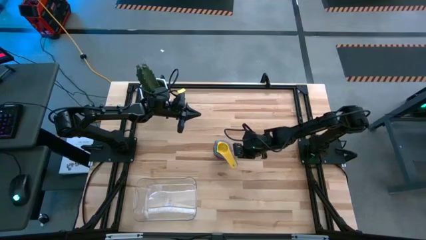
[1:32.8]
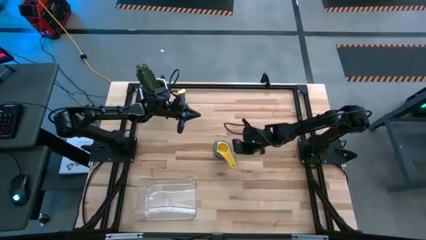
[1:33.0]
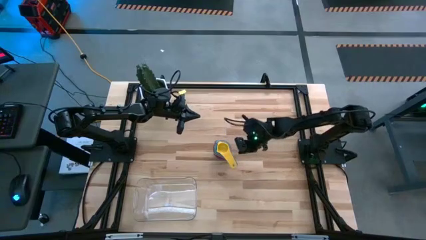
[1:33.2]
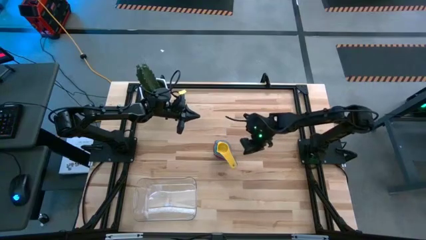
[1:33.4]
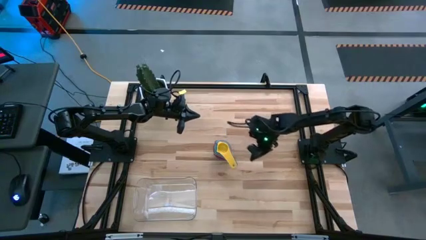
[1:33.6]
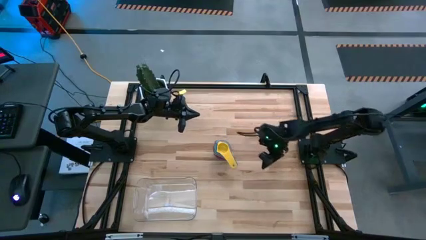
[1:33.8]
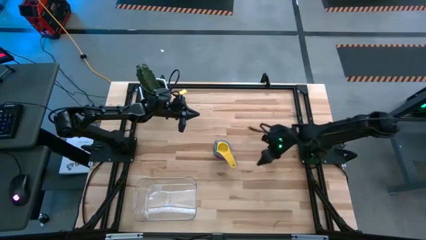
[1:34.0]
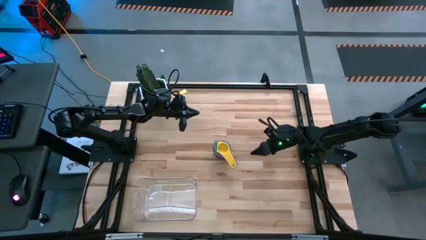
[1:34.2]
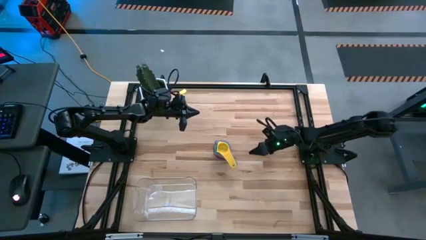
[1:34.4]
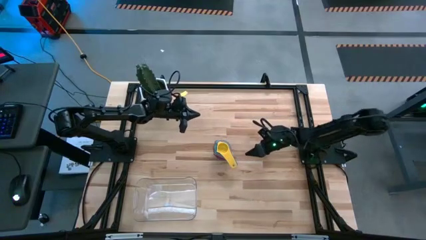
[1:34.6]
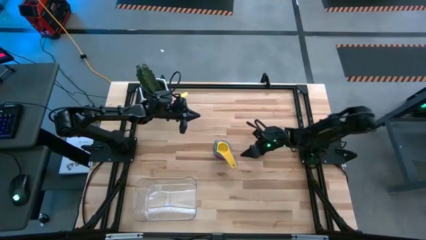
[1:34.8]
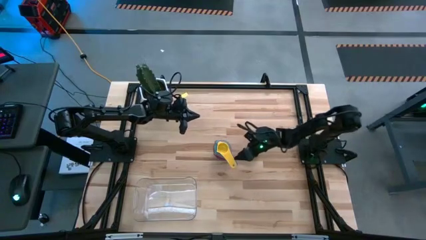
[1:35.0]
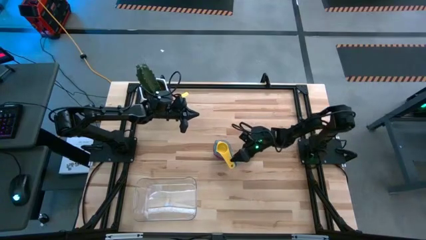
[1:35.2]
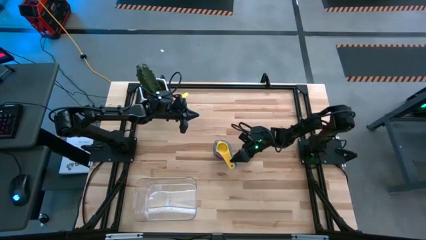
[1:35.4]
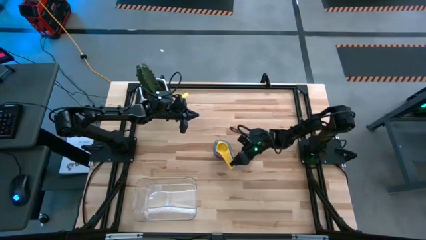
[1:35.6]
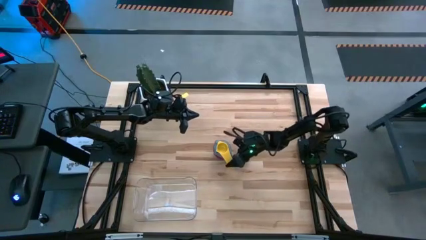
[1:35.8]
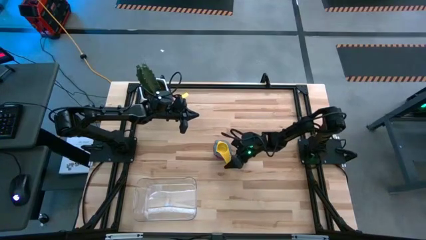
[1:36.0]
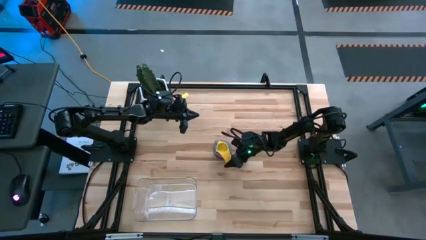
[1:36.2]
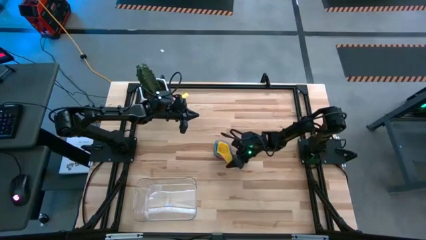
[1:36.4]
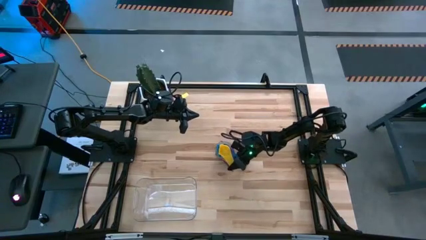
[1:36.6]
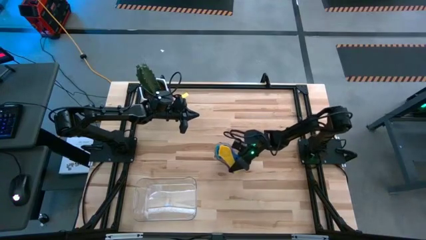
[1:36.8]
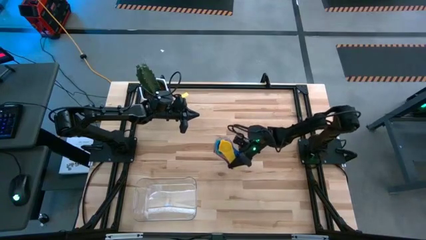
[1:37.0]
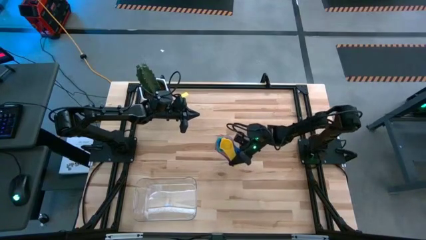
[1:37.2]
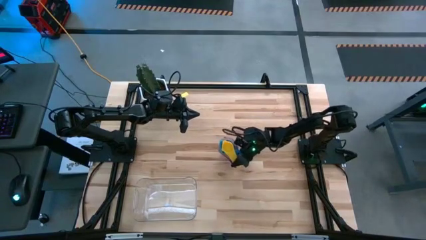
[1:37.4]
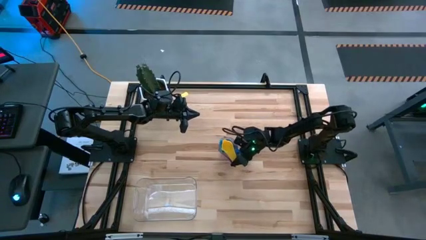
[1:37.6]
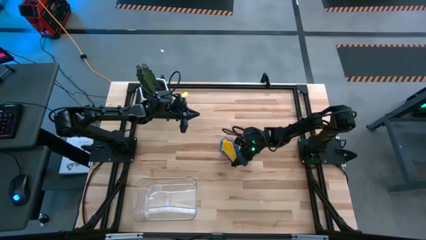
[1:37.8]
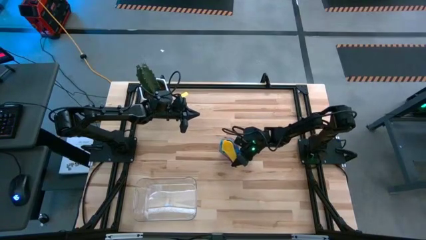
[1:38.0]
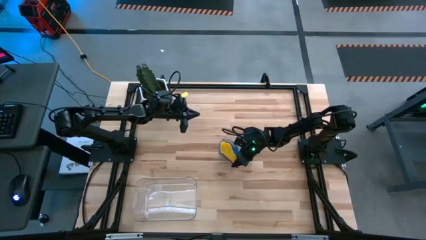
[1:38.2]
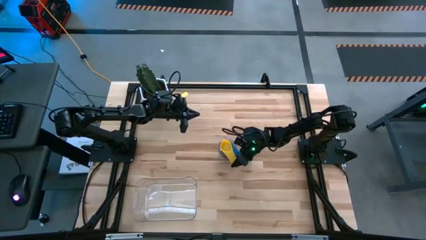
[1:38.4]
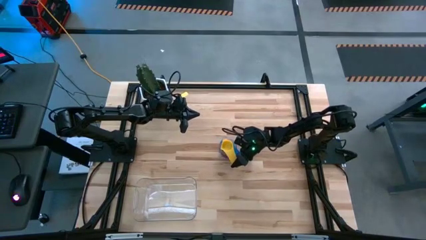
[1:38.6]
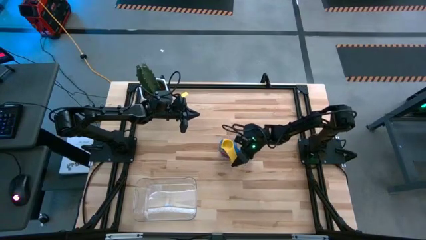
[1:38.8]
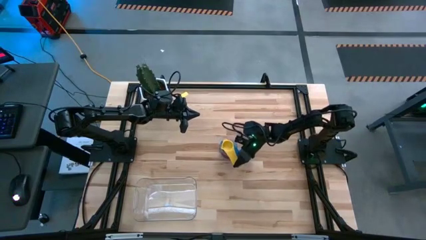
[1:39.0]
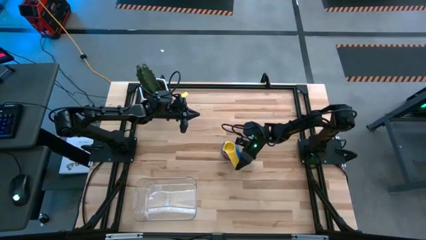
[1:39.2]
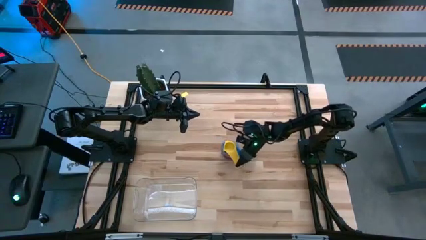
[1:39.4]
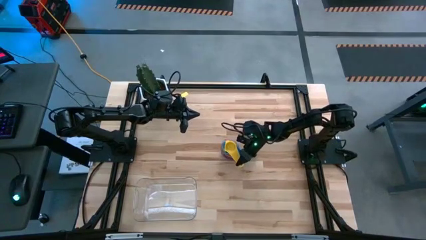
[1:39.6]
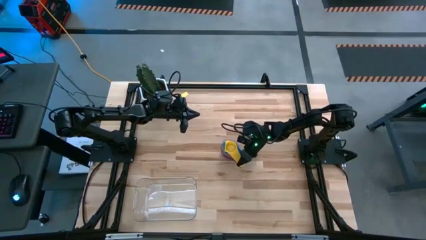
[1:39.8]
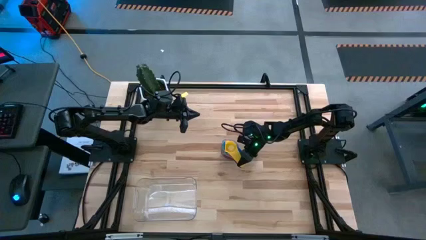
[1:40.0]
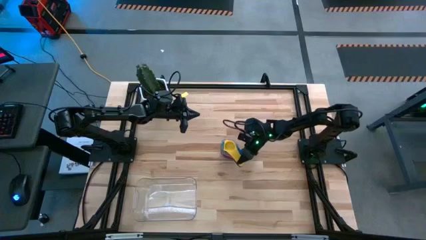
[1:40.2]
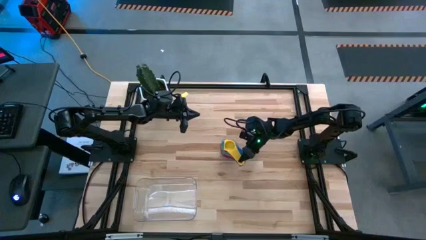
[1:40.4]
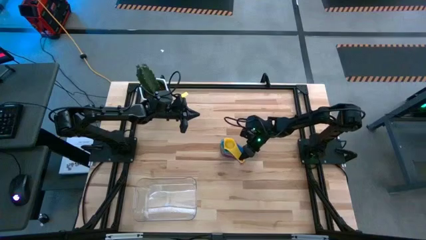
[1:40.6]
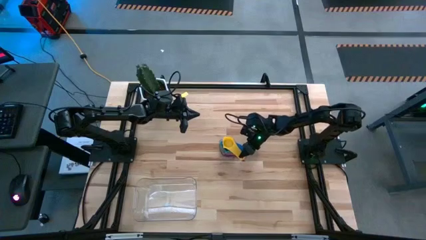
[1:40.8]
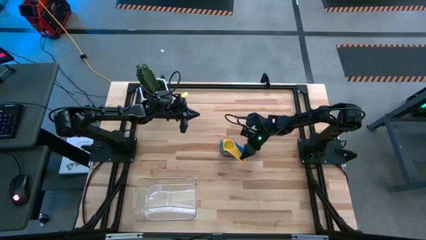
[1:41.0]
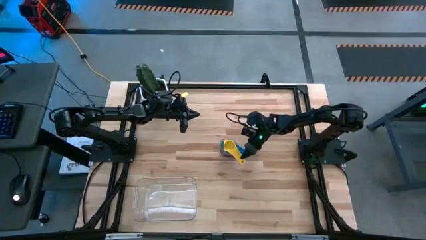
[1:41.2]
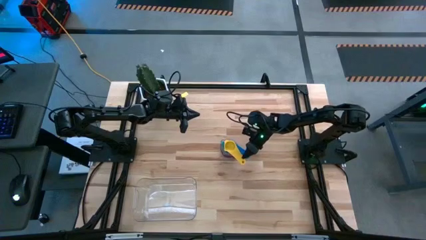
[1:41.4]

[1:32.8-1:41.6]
Task: Nest measuring cups in basket
Put the nested measuring cups into the transparent bin

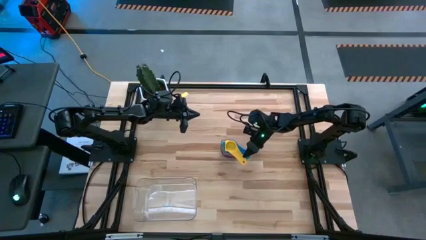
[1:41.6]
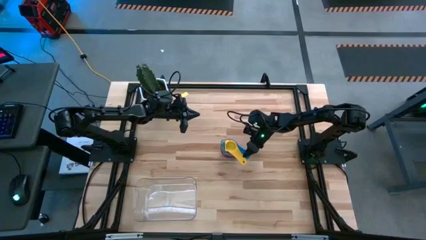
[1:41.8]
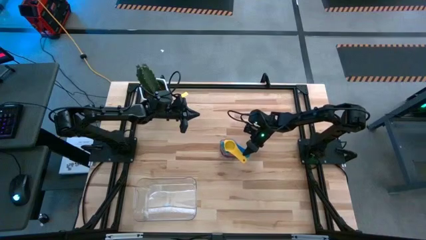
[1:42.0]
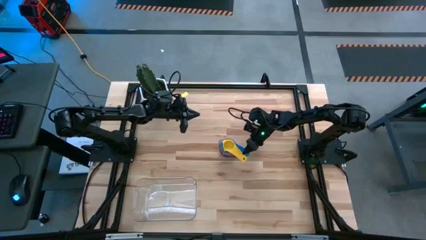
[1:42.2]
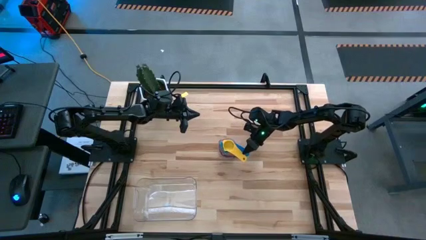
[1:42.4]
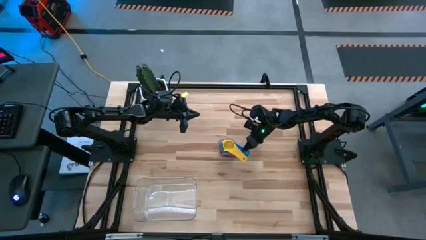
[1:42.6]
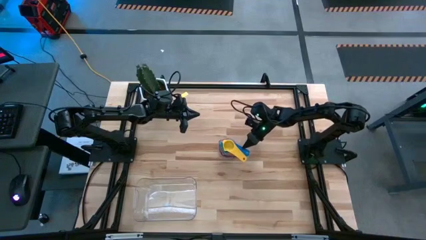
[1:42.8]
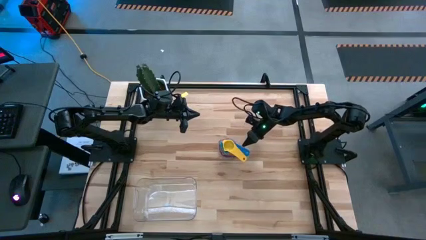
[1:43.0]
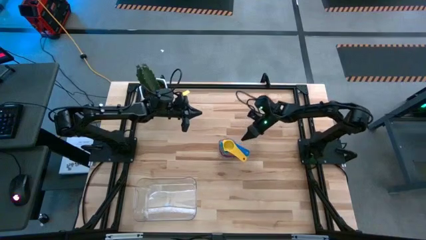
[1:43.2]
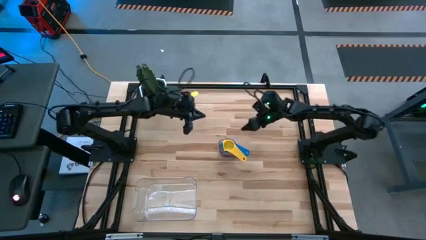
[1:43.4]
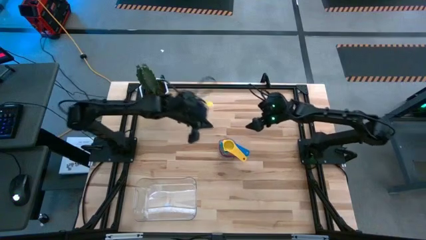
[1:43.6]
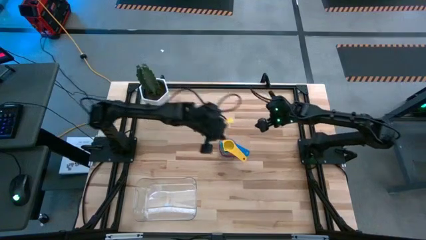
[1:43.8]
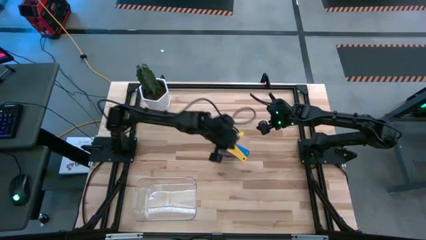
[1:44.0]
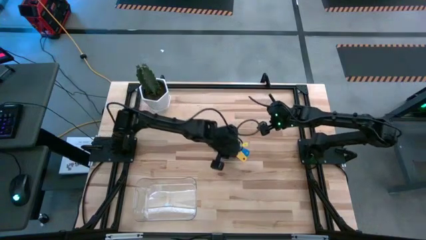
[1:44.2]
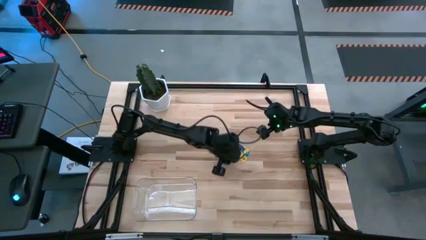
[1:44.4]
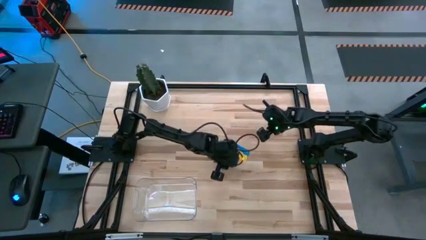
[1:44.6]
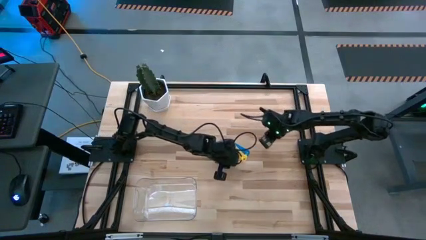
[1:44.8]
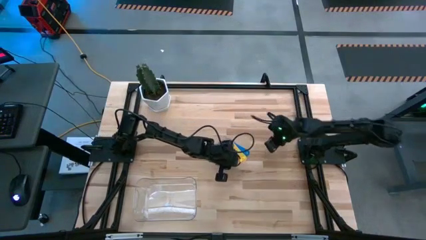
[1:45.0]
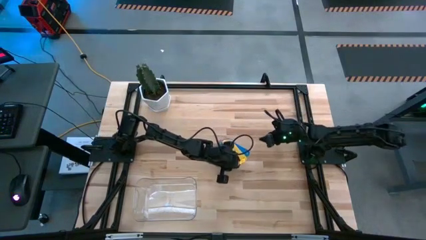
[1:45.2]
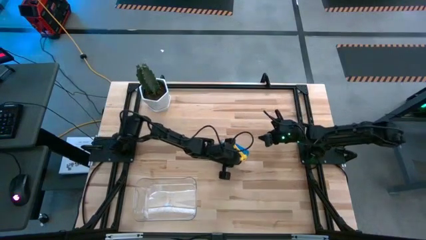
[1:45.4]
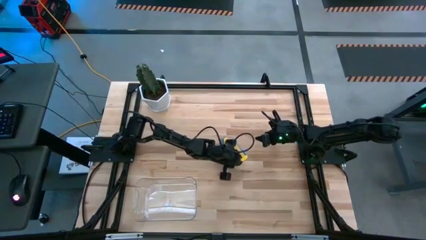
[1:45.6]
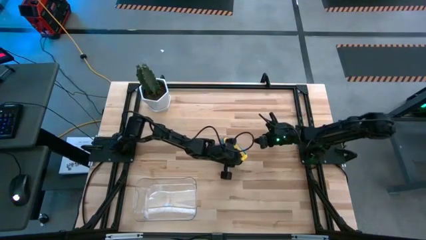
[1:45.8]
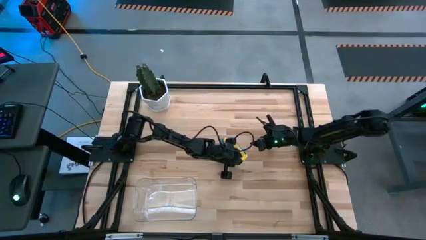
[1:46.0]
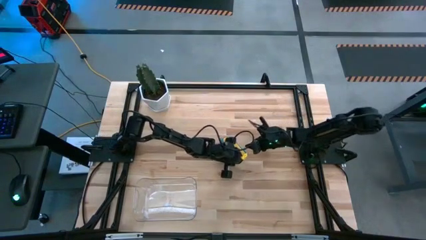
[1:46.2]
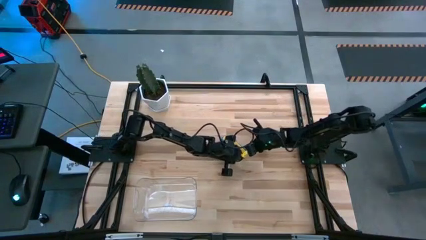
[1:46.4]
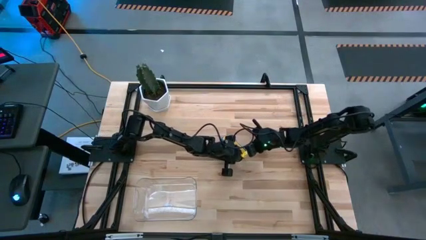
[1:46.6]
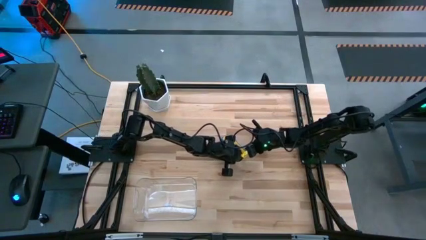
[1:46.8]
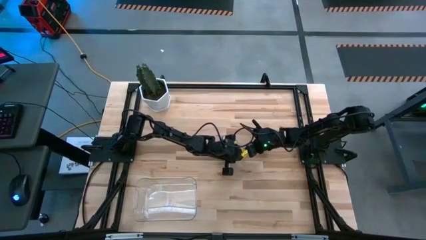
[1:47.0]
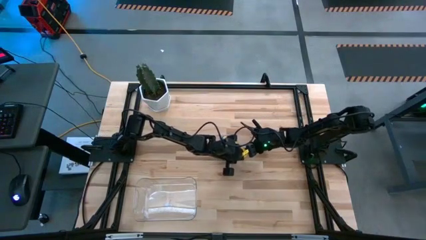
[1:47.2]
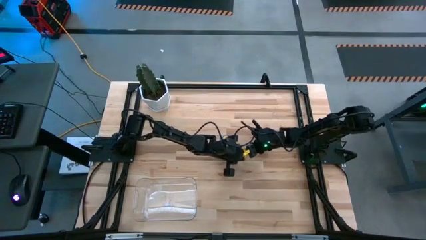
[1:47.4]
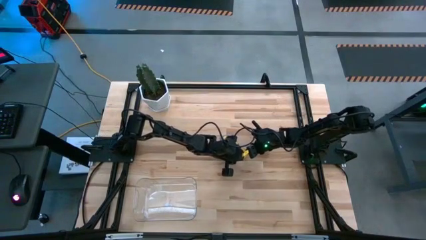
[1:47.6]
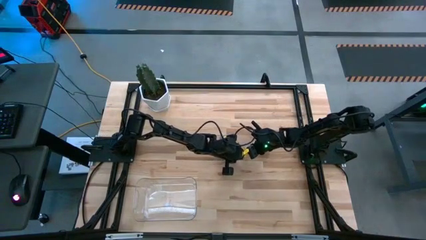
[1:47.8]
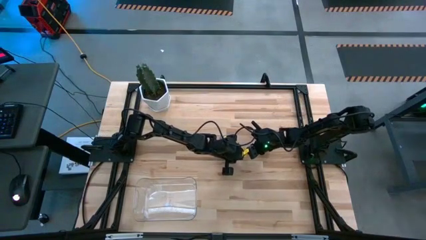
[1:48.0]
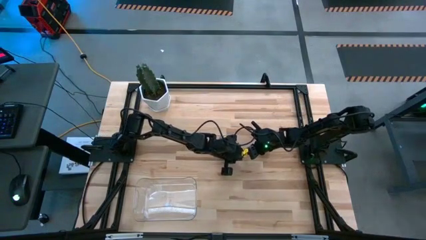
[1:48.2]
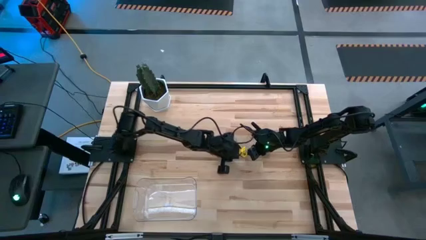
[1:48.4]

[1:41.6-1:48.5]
Adjust the nested measuring cups
